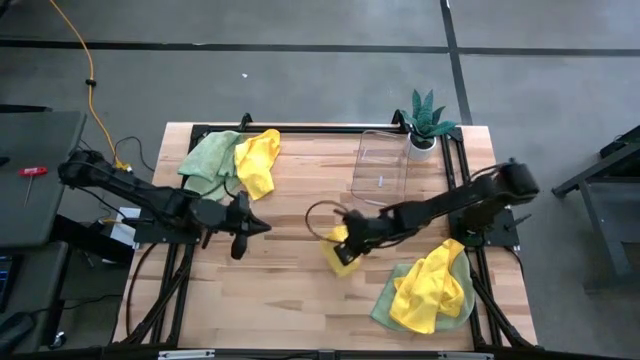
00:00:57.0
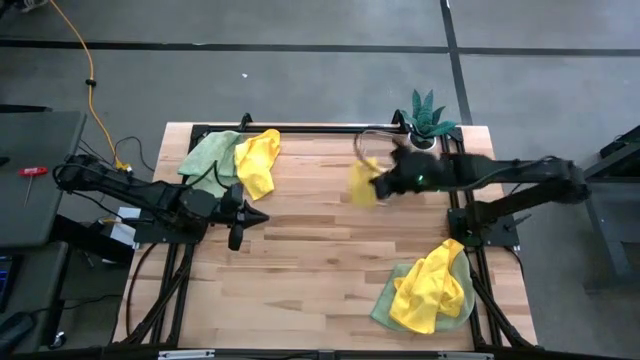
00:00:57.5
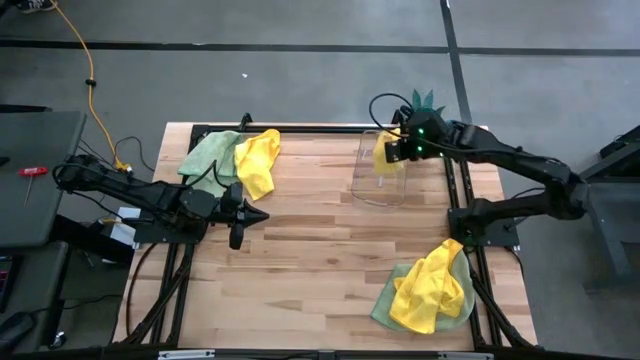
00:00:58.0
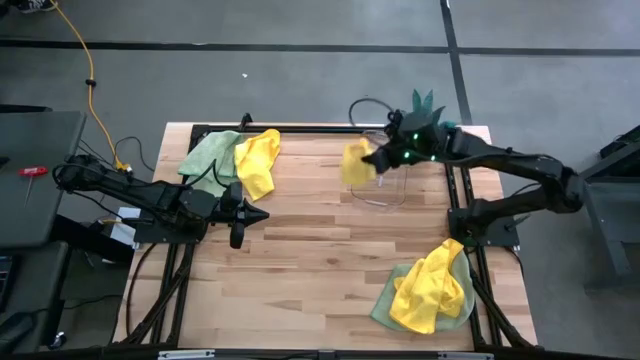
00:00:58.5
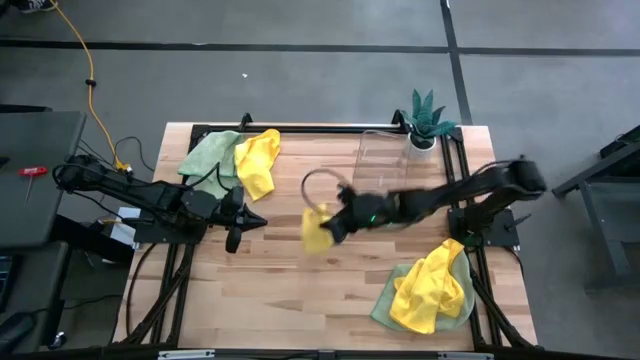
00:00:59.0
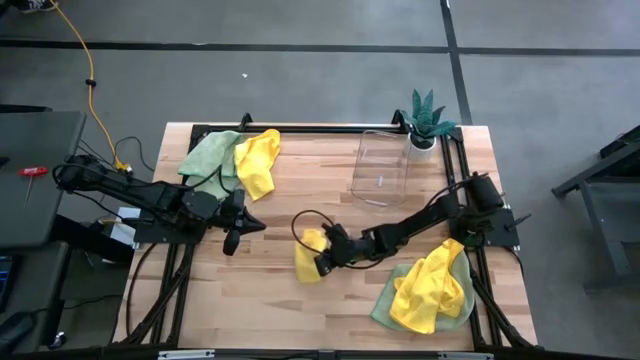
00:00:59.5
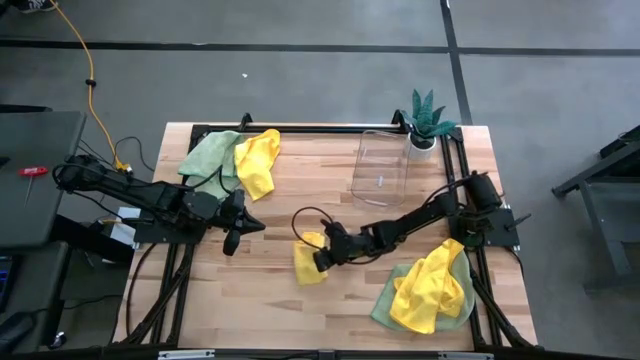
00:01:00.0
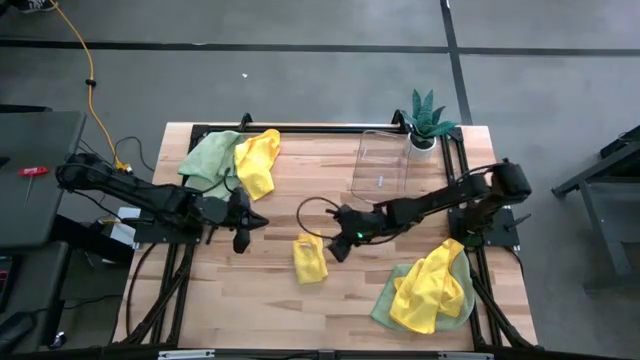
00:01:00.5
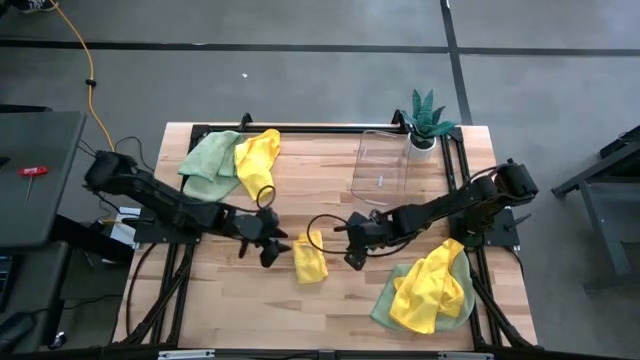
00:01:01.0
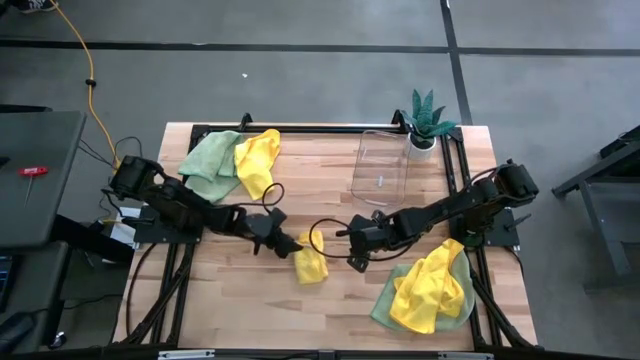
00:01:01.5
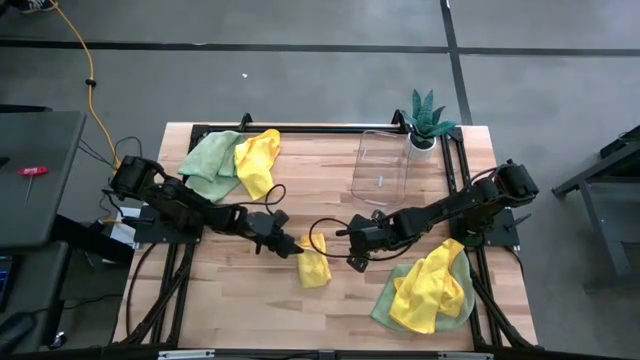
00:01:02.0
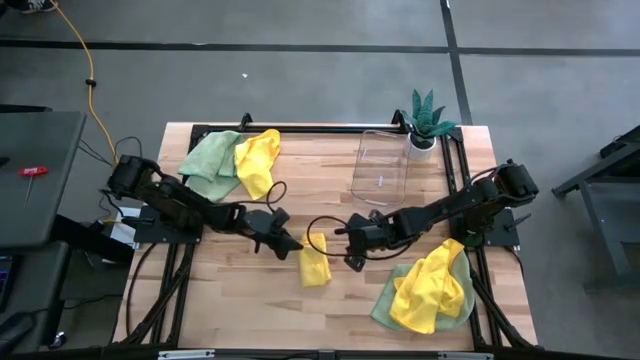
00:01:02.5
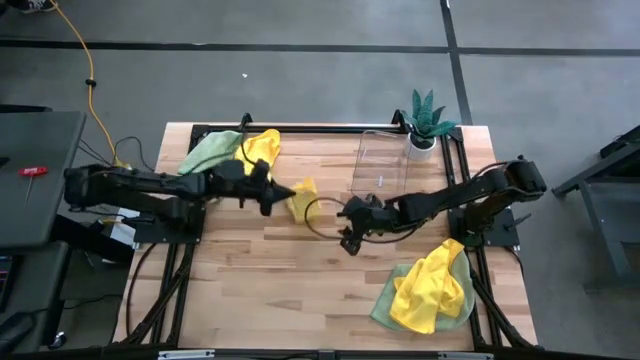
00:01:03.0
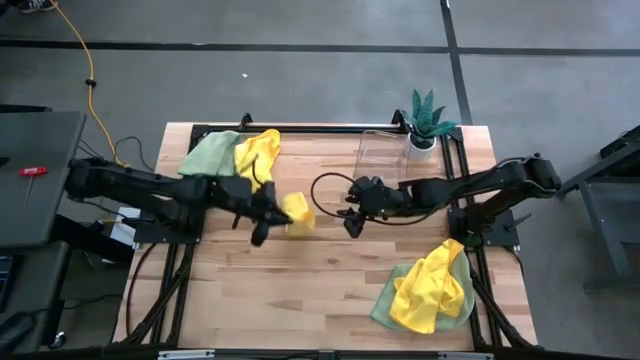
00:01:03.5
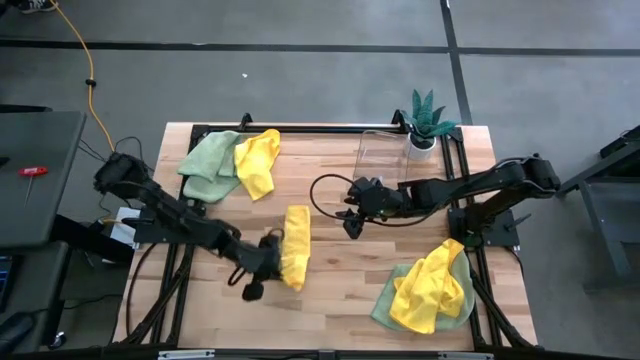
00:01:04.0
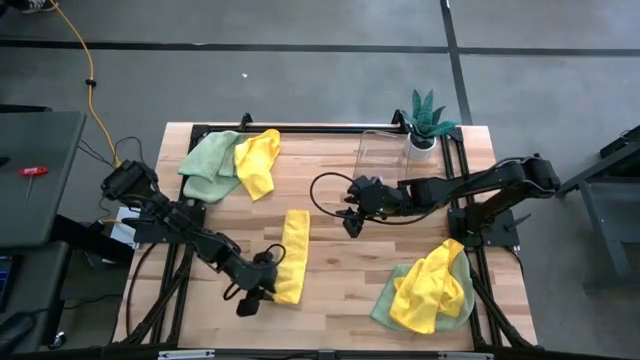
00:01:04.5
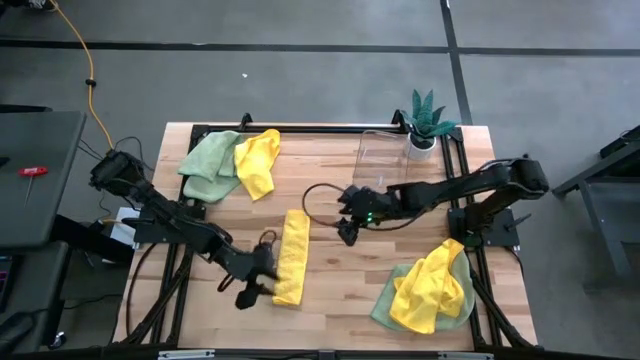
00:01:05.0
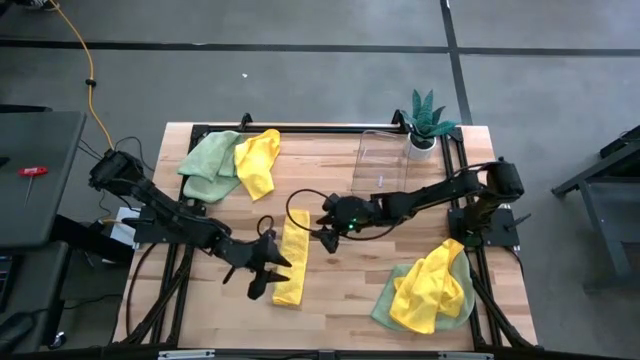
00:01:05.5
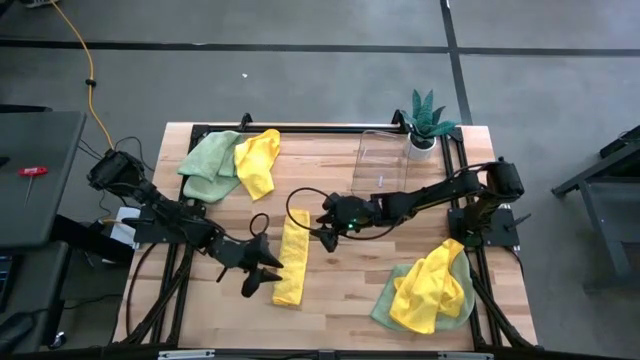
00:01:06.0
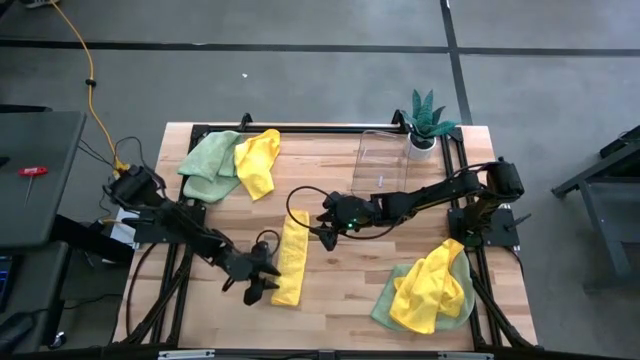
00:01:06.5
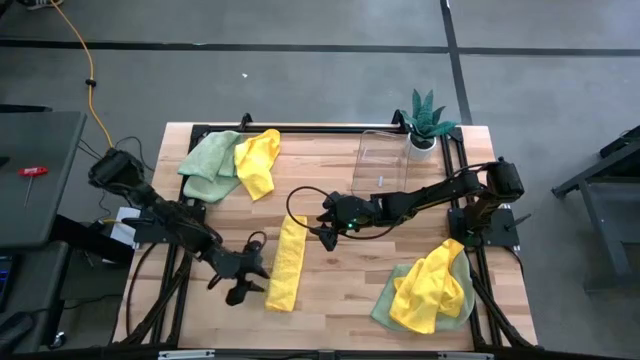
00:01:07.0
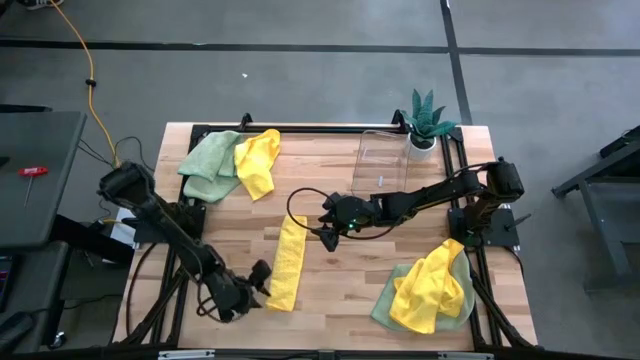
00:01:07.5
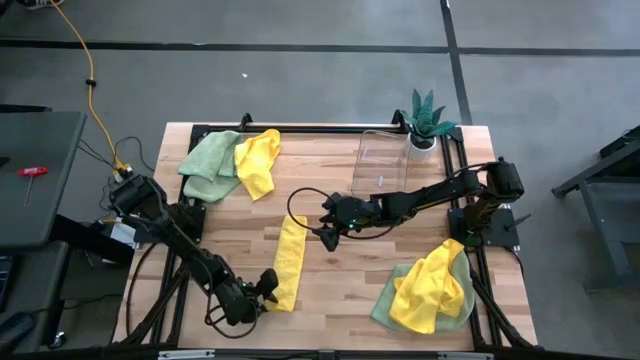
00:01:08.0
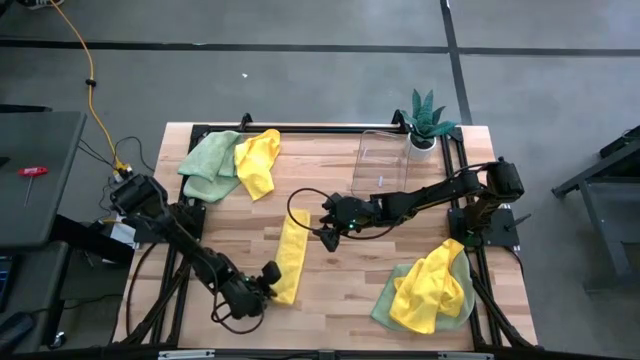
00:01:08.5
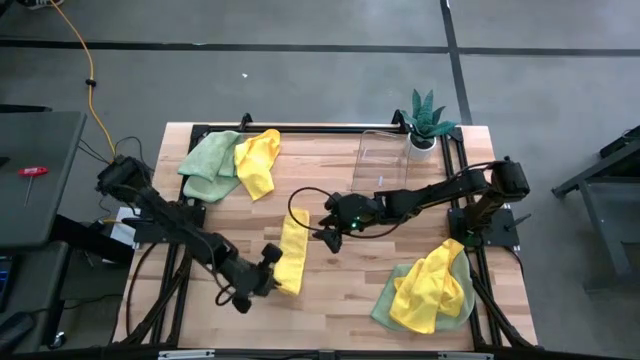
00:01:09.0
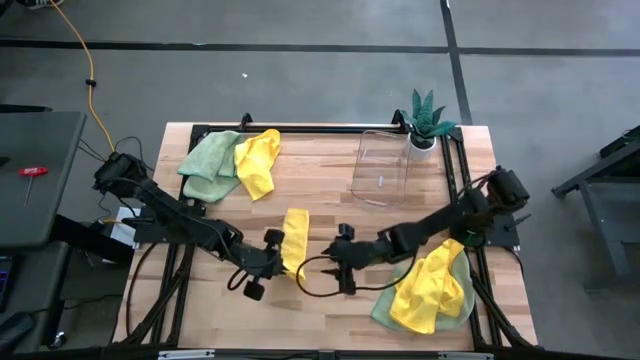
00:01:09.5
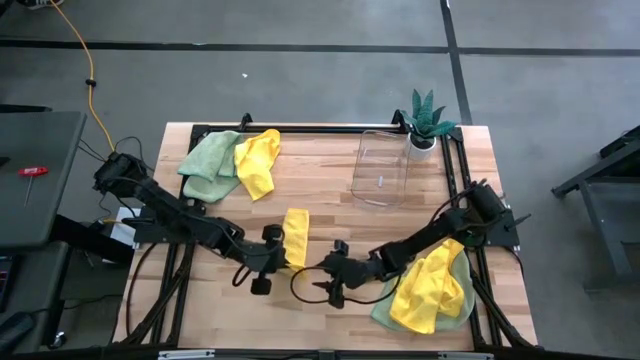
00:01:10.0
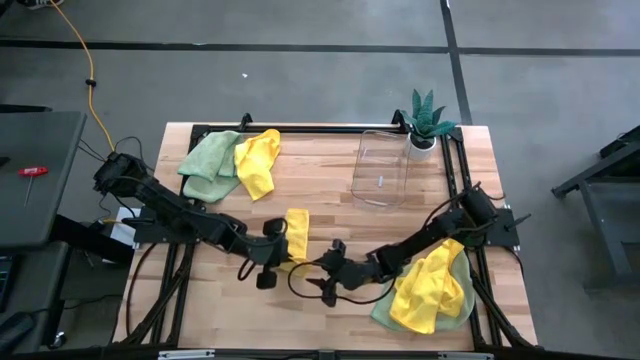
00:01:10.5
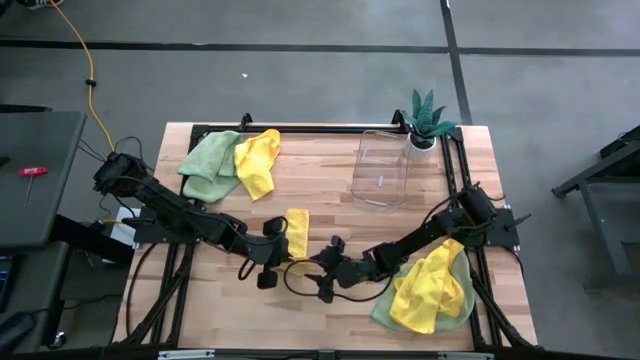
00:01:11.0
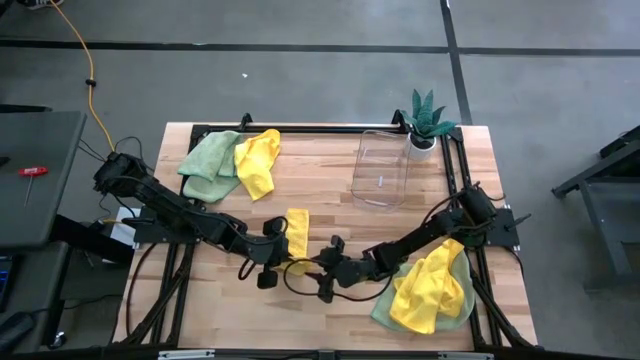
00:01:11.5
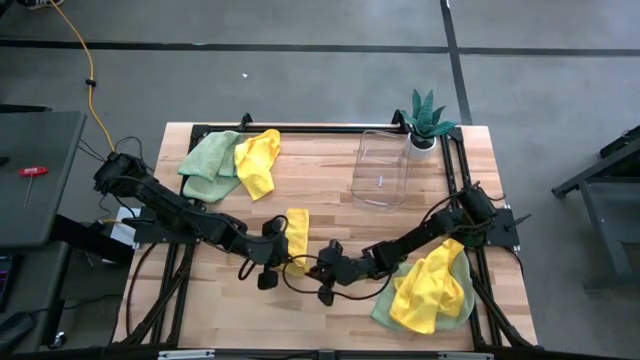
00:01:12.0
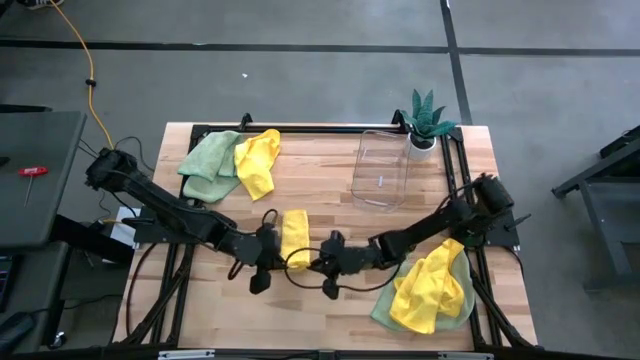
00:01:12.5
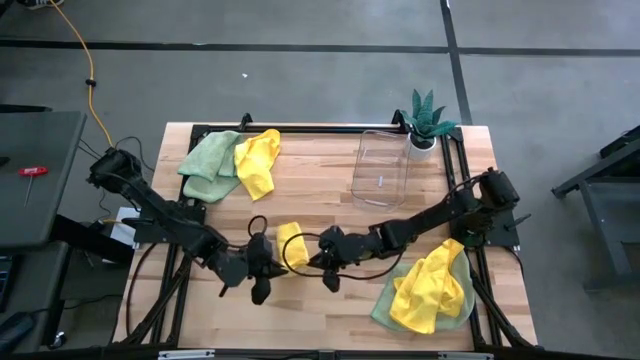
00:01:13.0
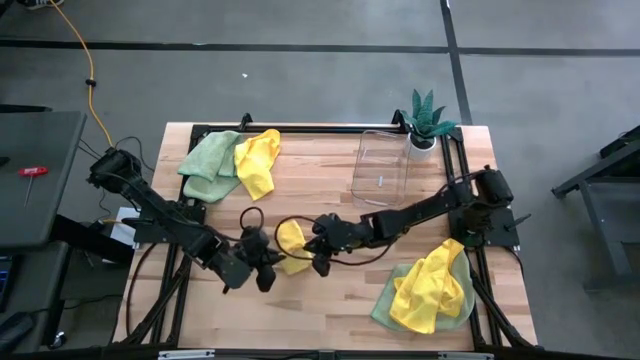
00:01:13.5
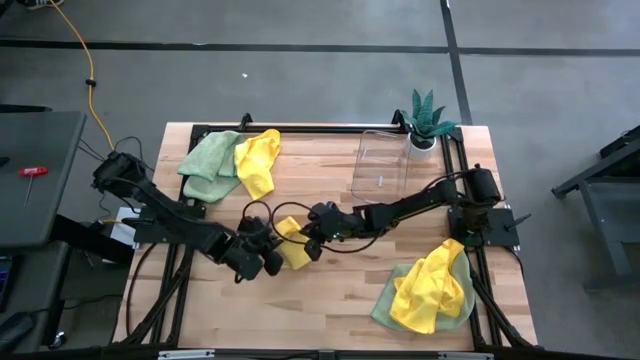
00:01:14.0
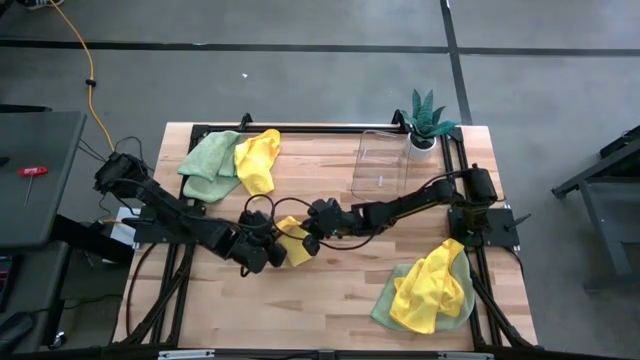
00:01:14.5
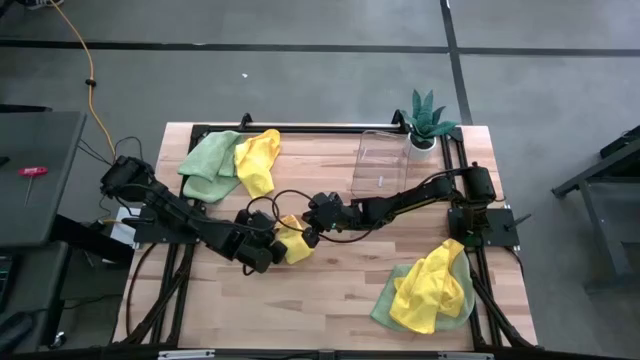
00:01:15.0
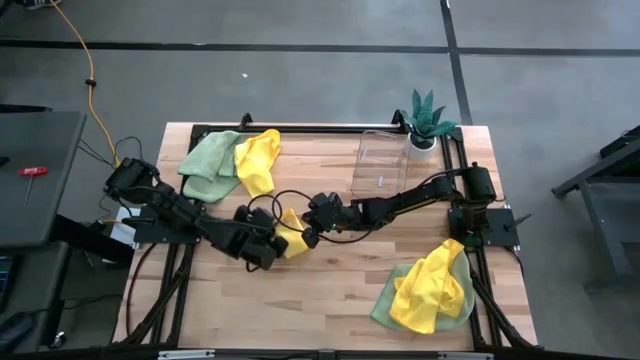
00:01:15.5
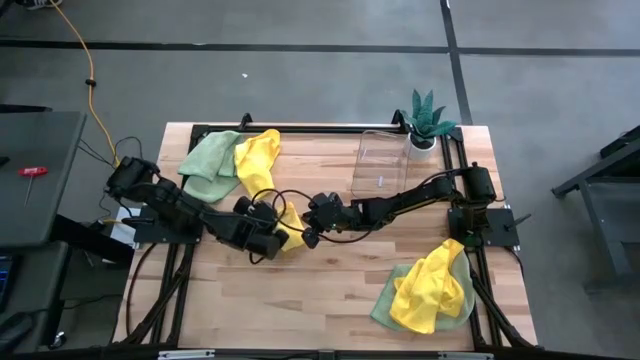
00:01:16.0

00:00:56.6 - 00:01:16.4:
Task: Fold microfiber towels
Fold the middle yellow microfiber towel

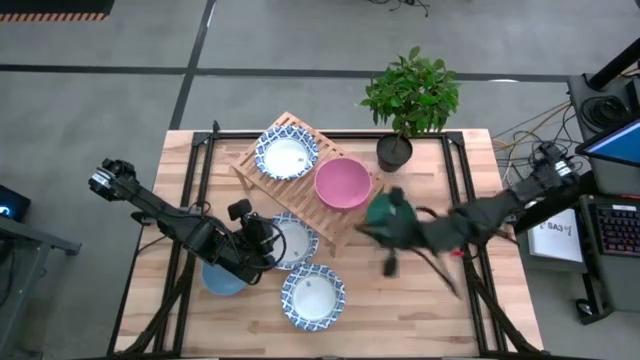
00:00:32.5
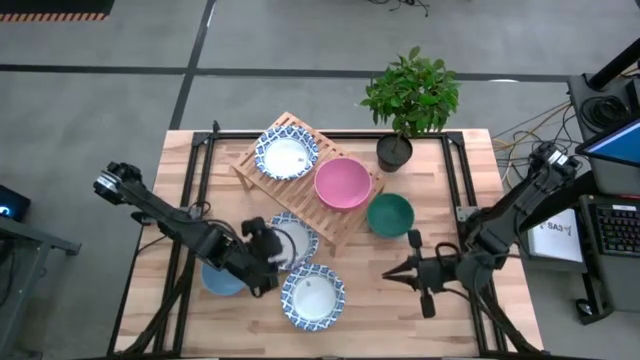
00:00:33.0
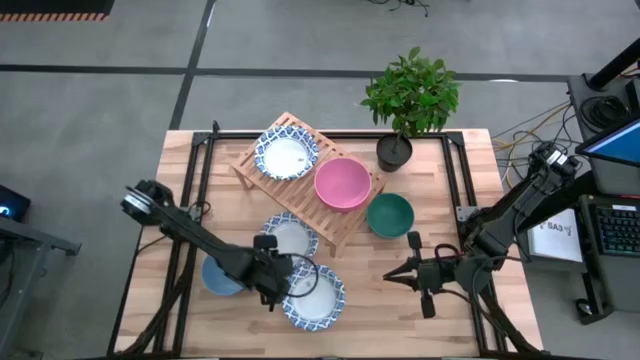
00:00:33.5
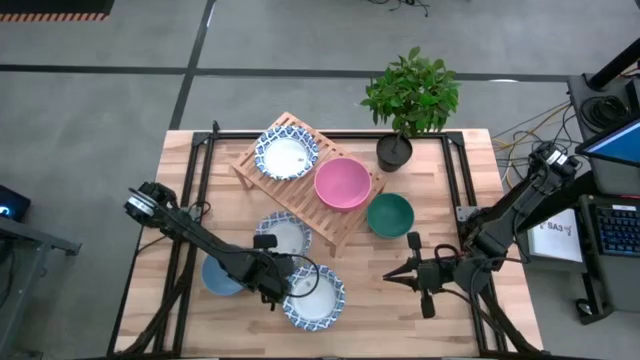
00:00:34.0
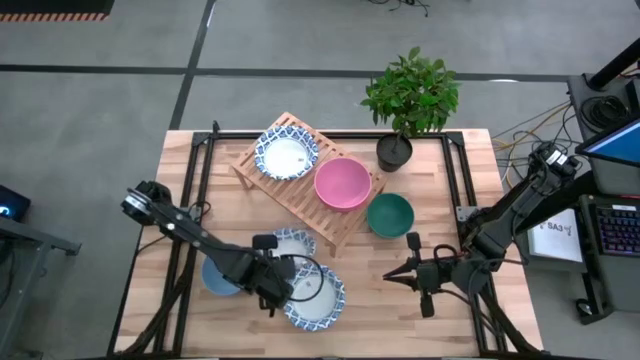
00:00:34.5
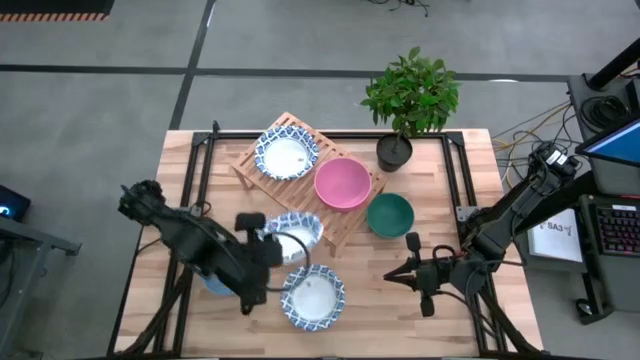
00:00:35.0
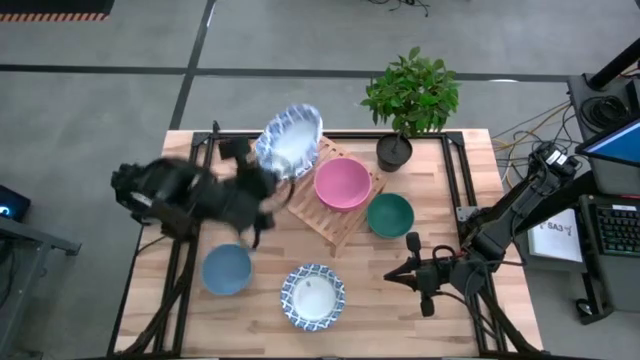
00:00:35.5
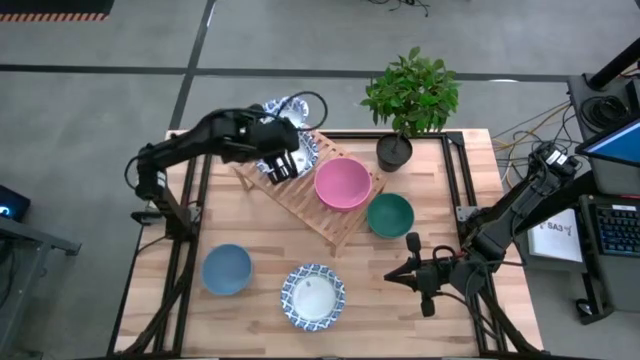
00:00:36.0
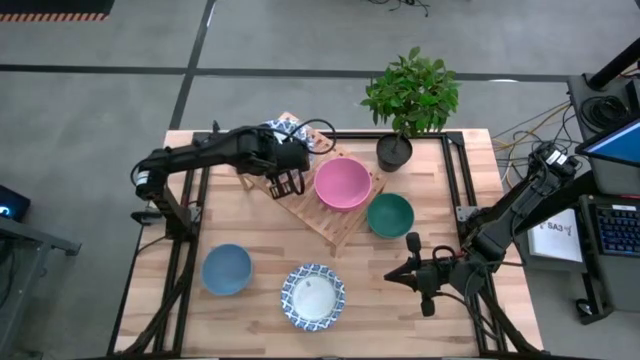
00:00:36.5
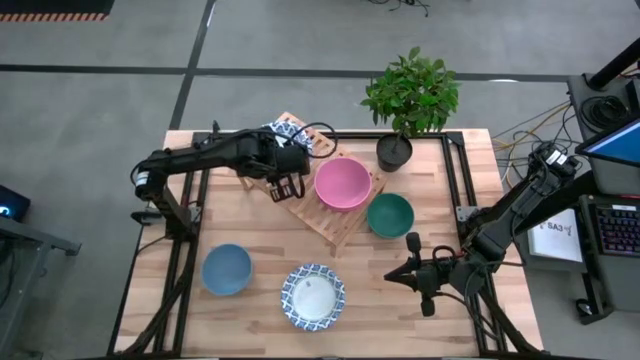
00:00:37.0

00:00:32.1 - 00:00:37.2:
Task: Place and stack bowls onto a shelf
Stack the top white bowl on top of the white bowl on the shelf
